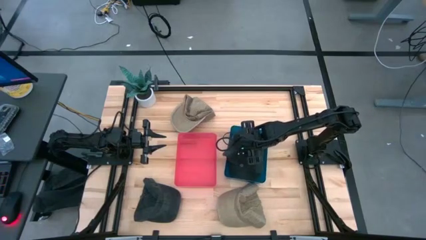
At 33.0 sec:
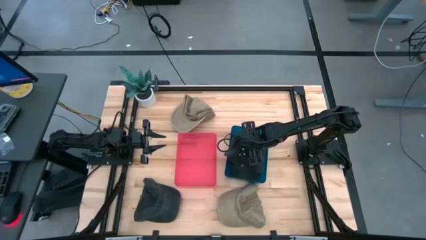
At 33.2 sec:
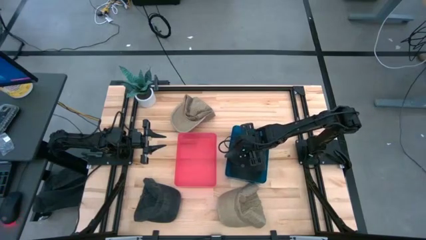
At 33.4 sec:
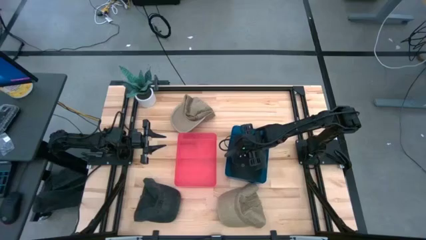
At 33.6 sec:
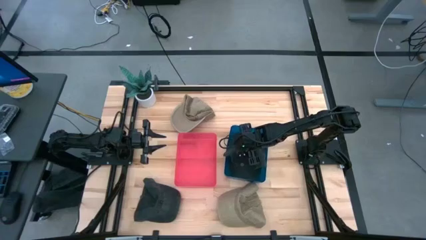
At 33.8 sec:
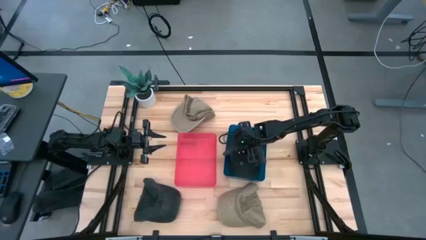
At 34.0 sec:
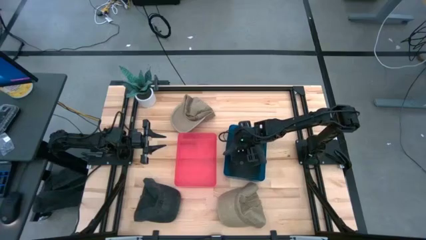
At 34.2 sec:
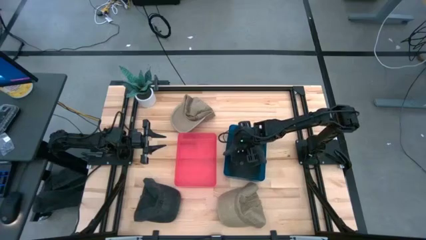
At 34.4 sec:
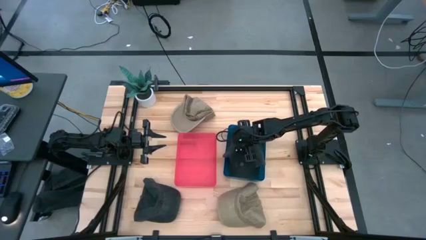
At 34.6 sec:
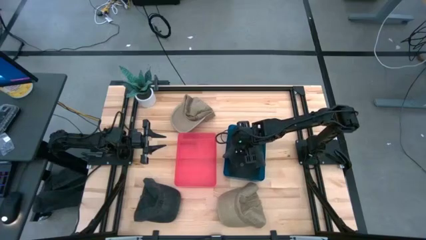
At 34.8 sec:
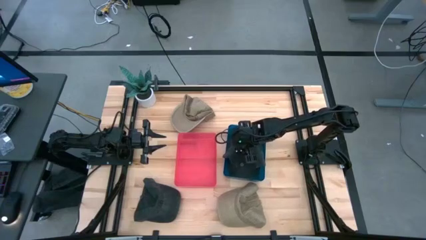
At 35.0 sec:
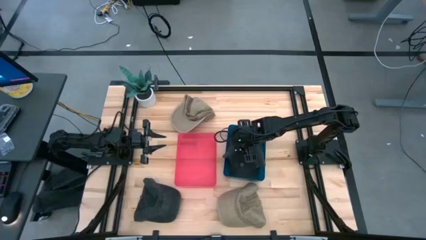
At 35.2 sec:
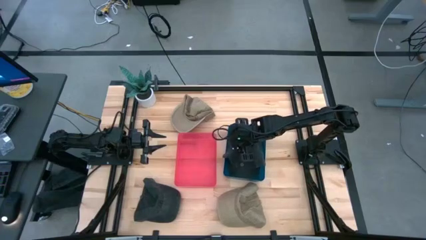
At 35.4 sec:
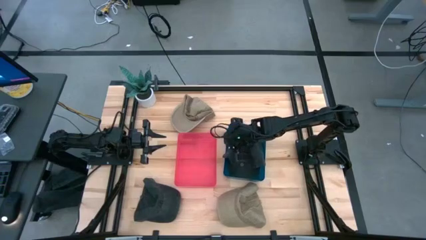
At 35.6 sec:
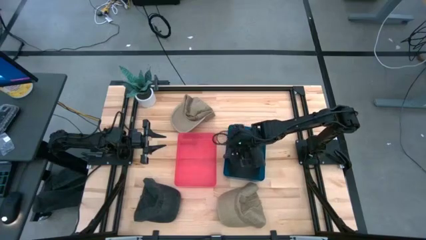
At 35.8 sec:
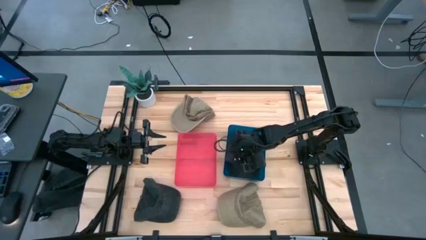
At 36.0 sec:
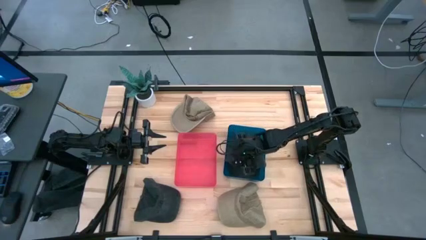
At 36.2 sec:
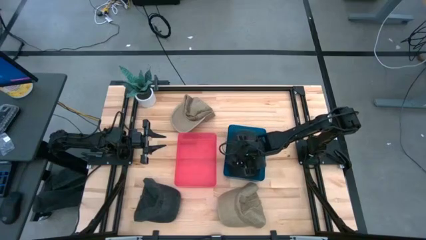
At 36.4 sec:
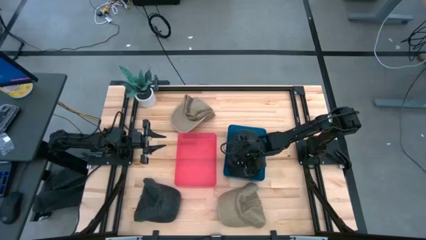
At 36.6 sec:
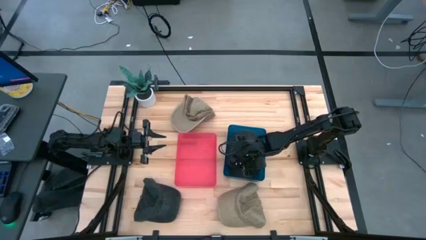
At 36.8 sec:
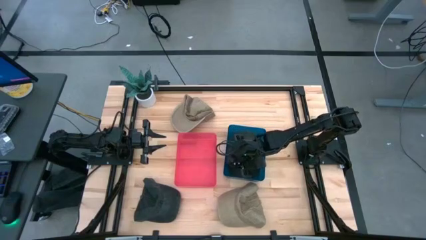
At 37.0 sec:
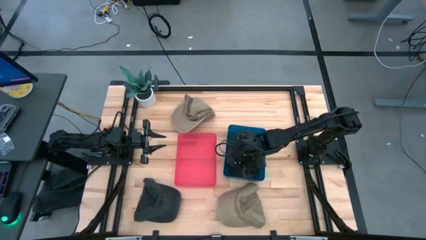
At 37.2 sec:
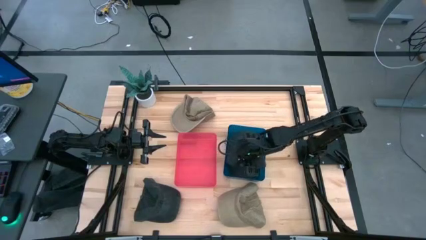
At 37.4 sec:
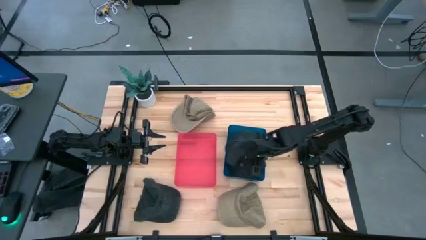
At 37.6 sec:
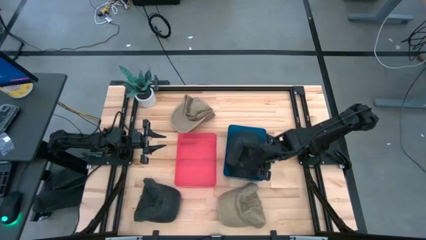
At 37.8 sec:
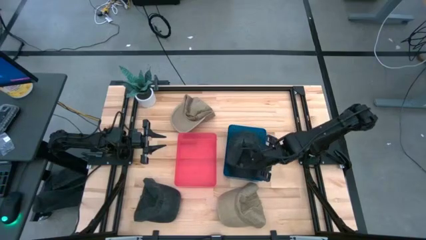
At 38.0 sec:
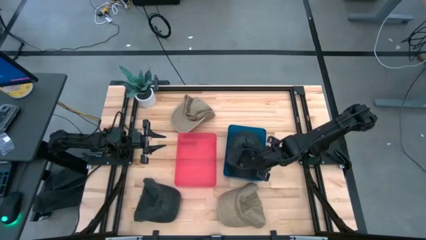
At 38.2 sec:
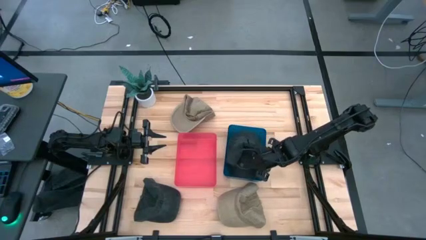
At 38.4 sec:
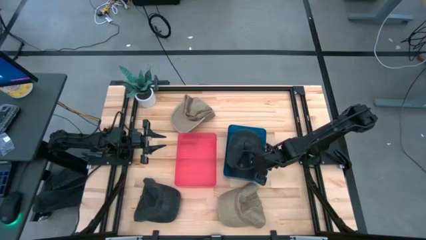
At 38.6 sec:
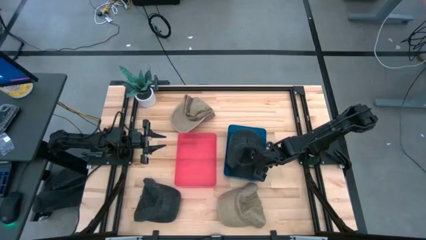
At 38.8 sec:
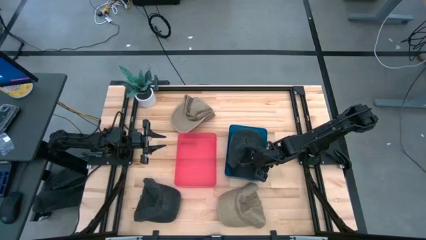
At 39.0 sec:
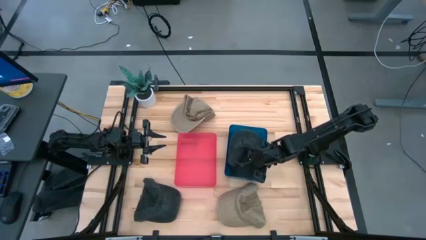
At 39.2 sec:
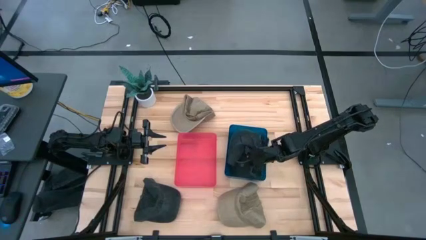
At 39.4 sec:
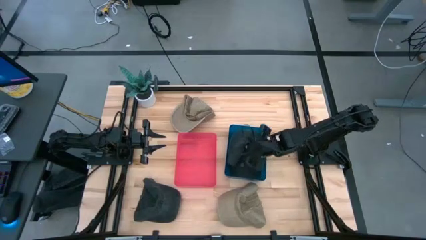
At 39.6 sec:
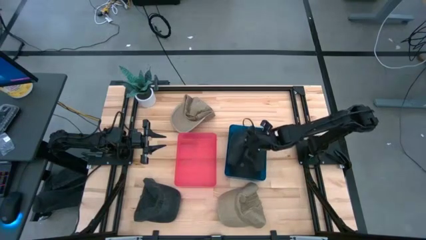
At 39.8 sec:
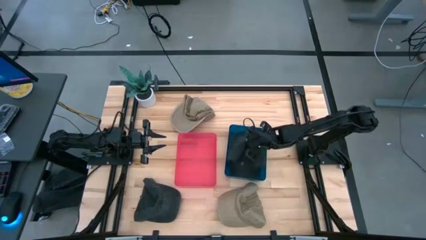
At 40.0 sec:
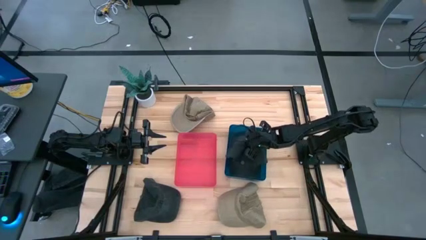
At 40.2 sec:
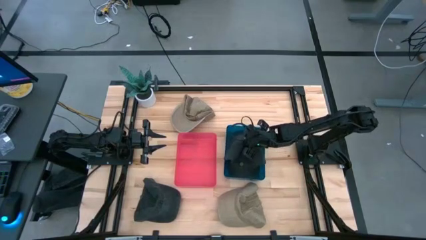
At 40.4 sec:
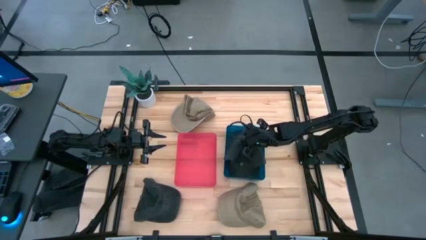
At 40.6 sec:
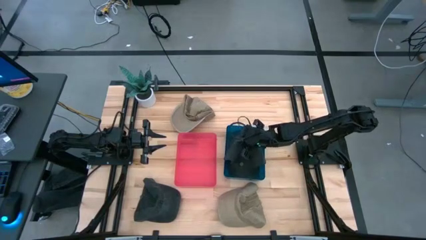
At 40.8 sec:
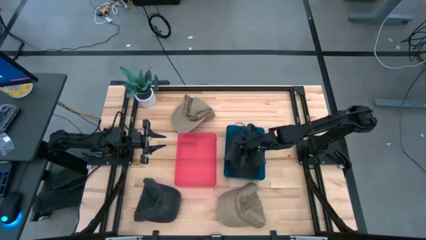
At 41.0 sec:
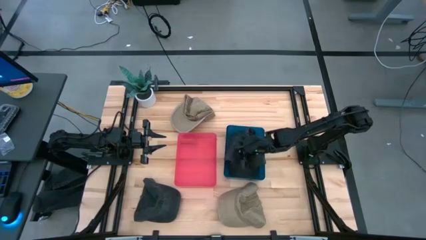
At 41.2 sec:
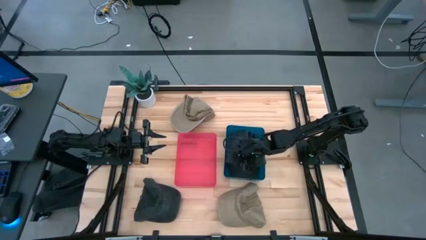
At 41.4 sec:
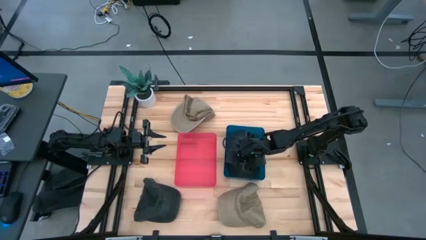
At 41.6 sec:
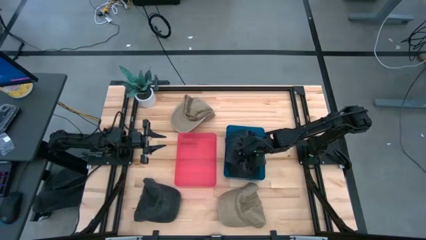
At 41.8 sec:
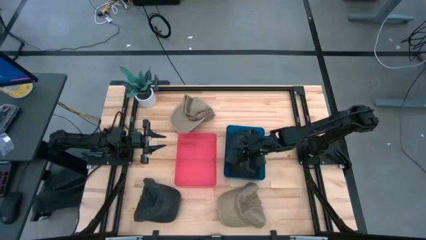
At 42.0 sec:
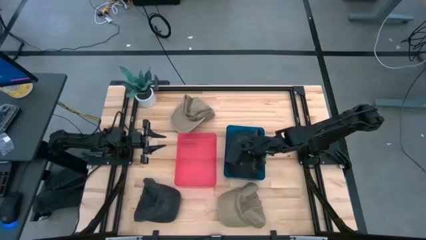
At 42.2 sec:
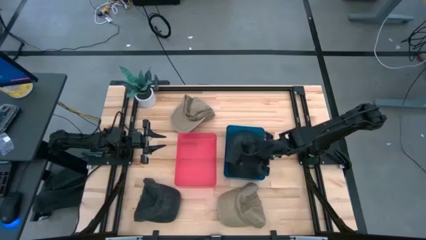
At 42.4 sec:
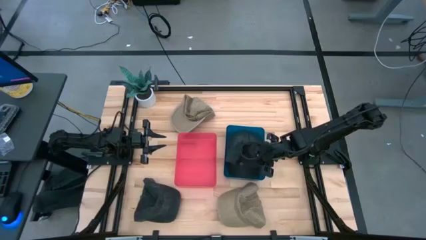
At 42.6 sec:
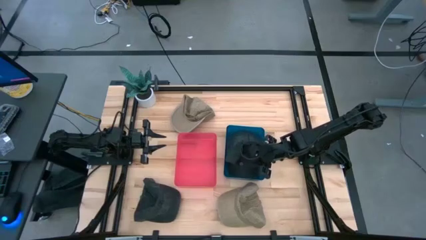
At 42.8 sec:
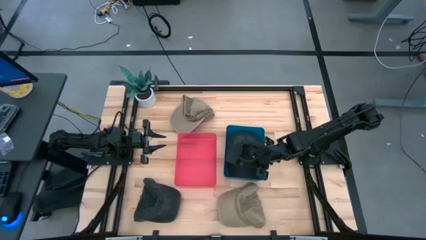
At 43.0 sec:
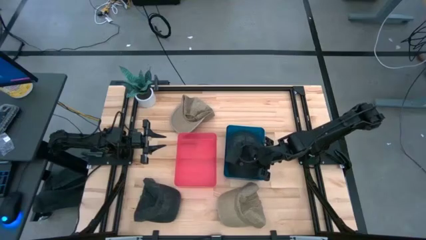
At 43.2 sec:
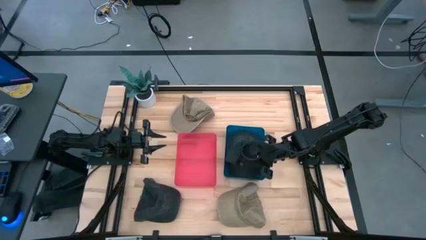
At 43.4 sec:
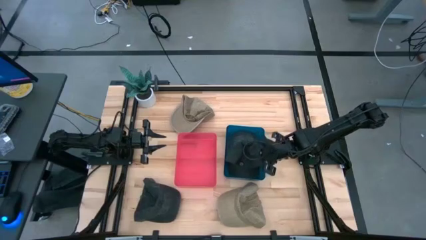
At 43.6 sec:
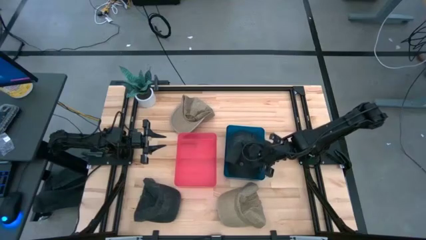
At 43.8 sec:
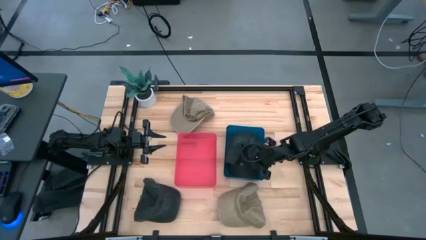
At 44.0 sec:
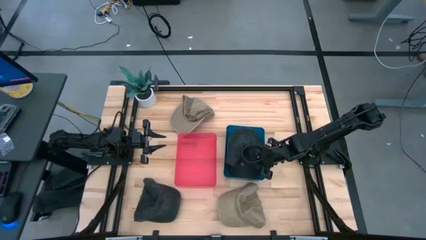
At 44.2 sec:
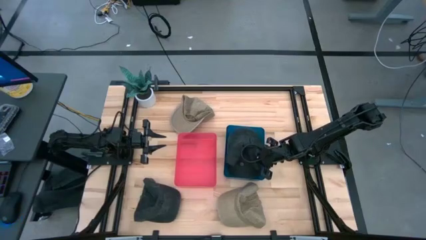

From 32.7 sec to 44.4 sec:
Task: Pick & Place hat
Put the top black cap into the blue bin
